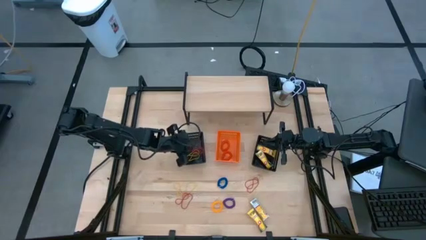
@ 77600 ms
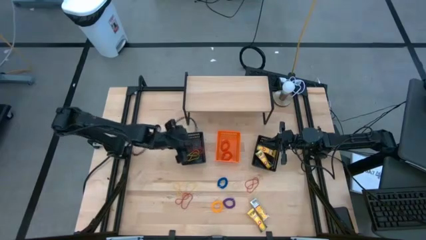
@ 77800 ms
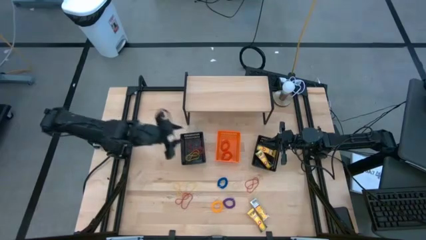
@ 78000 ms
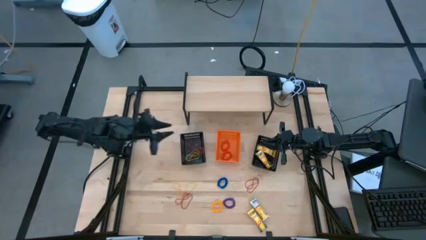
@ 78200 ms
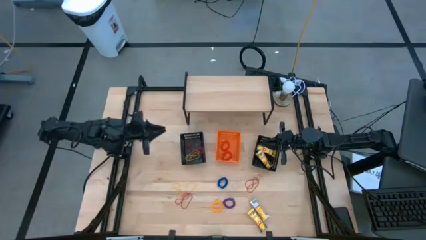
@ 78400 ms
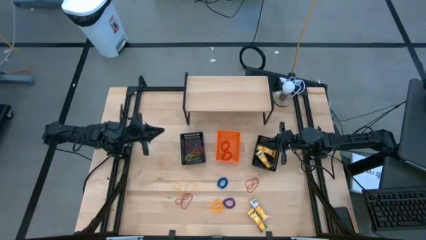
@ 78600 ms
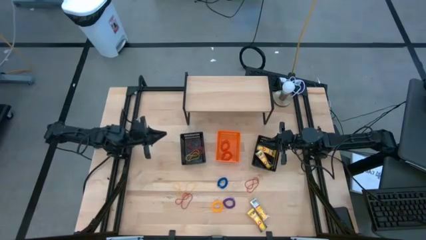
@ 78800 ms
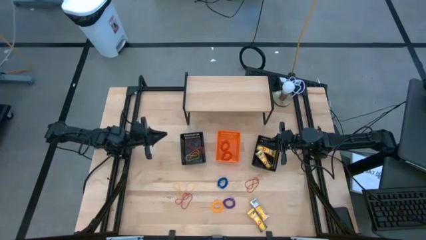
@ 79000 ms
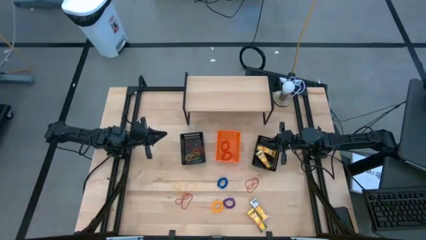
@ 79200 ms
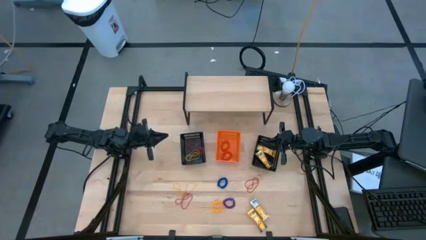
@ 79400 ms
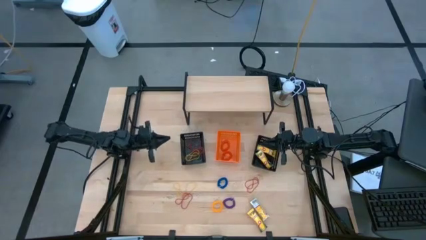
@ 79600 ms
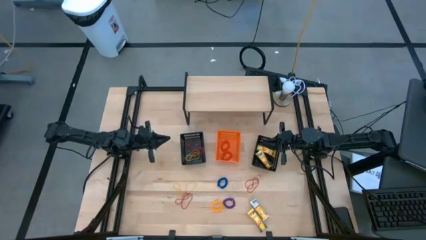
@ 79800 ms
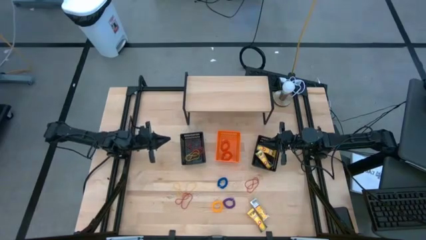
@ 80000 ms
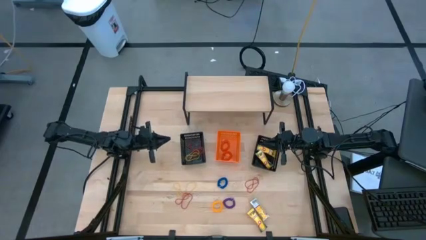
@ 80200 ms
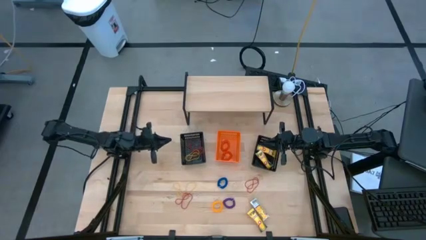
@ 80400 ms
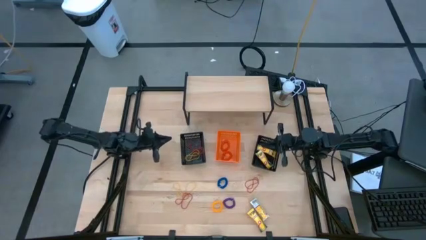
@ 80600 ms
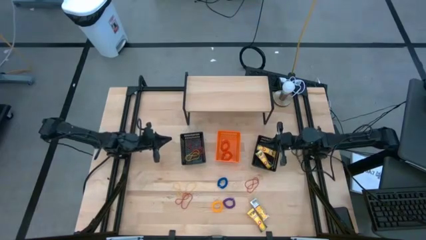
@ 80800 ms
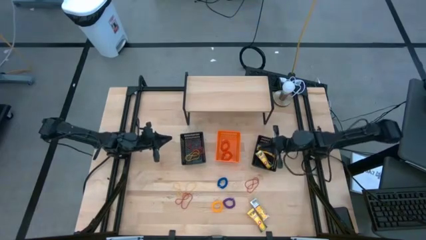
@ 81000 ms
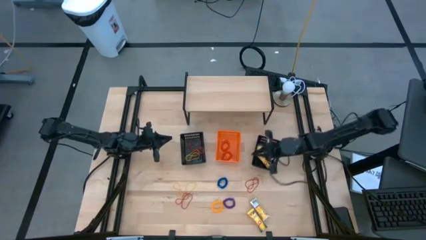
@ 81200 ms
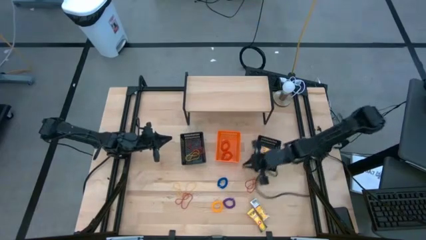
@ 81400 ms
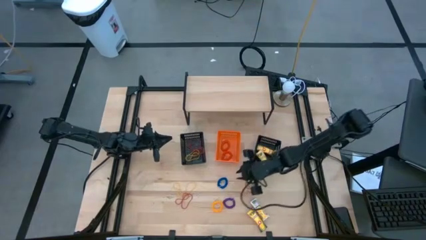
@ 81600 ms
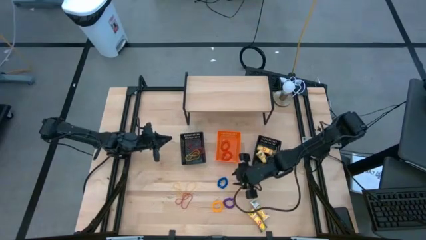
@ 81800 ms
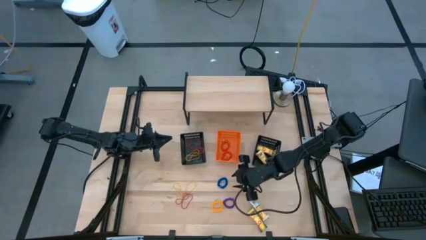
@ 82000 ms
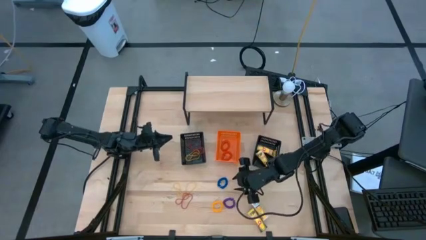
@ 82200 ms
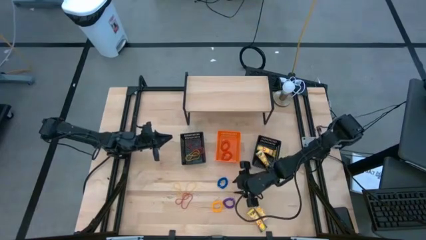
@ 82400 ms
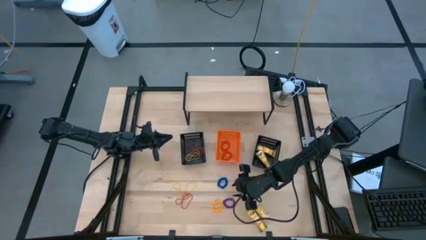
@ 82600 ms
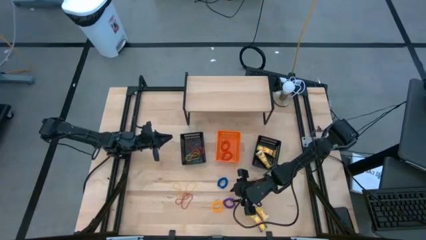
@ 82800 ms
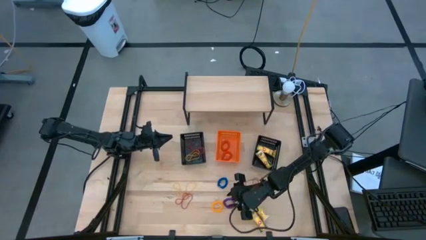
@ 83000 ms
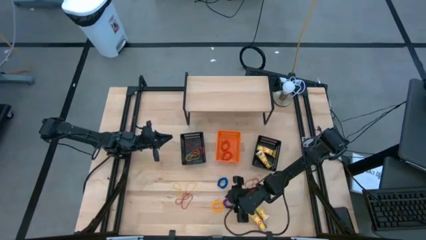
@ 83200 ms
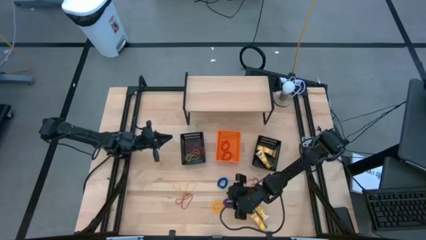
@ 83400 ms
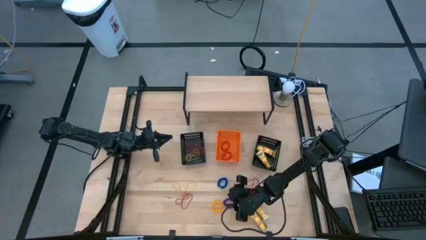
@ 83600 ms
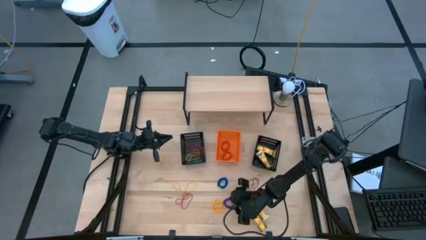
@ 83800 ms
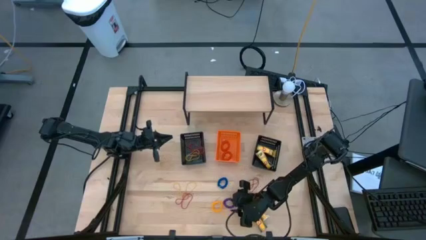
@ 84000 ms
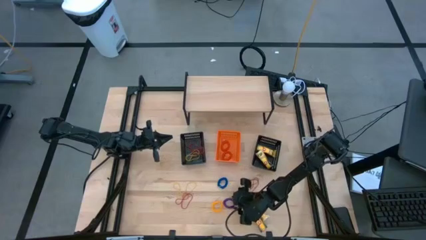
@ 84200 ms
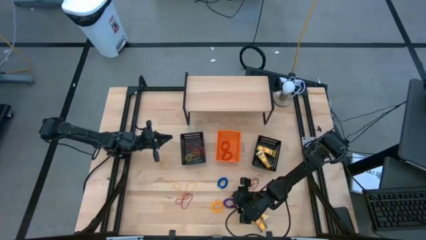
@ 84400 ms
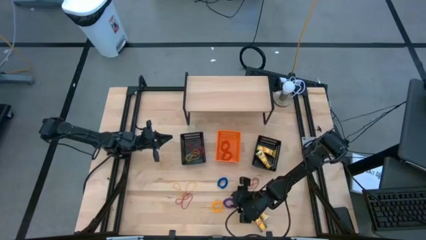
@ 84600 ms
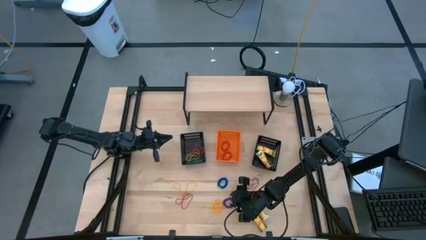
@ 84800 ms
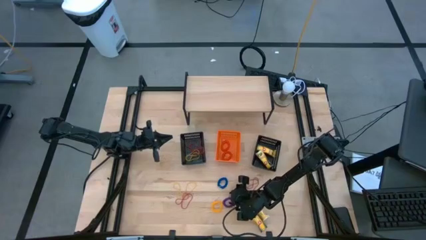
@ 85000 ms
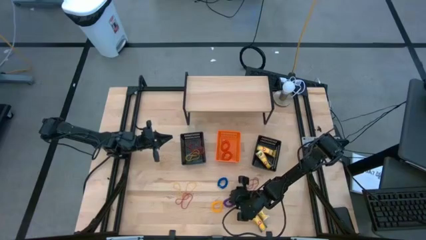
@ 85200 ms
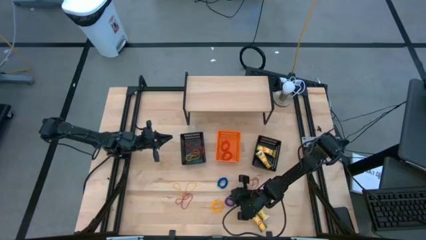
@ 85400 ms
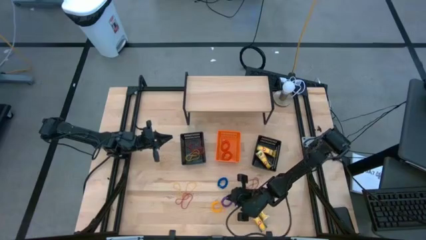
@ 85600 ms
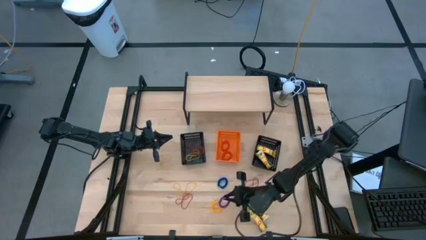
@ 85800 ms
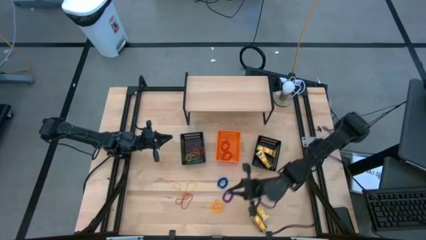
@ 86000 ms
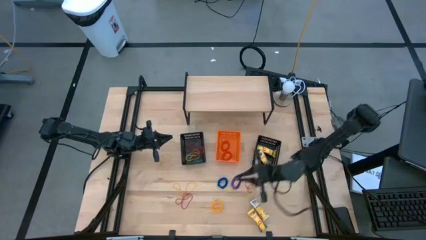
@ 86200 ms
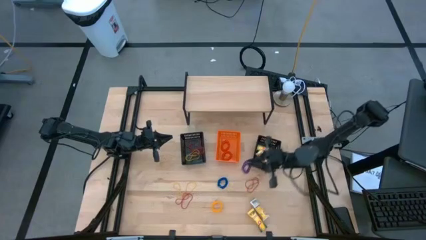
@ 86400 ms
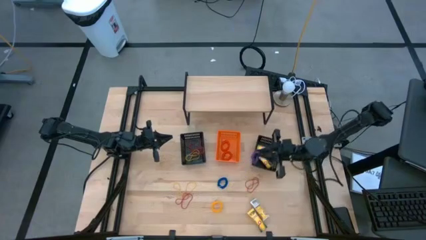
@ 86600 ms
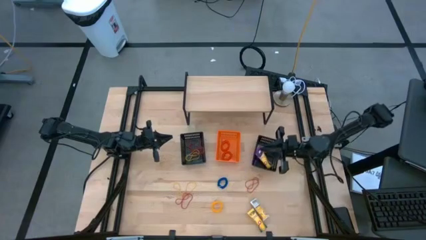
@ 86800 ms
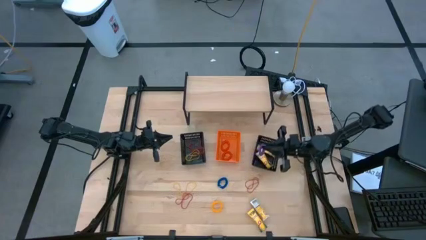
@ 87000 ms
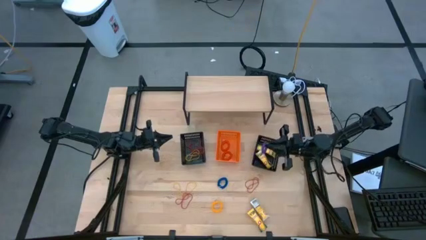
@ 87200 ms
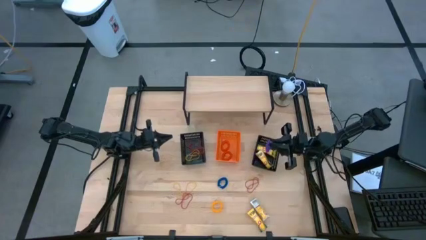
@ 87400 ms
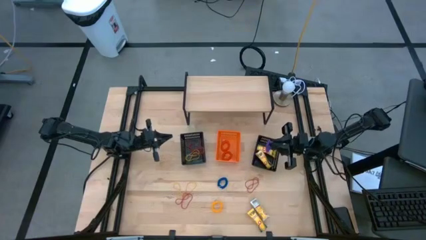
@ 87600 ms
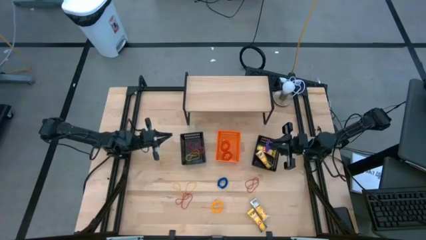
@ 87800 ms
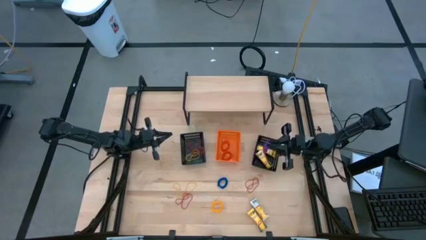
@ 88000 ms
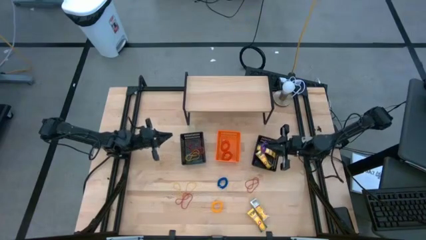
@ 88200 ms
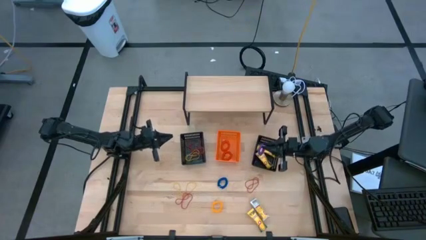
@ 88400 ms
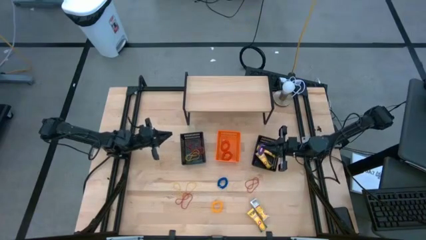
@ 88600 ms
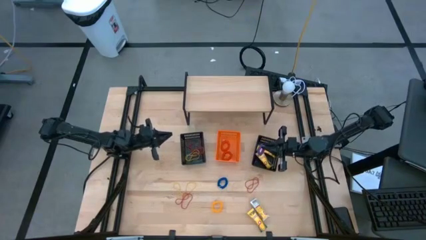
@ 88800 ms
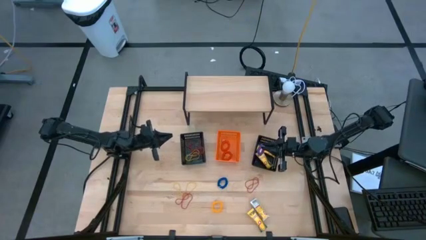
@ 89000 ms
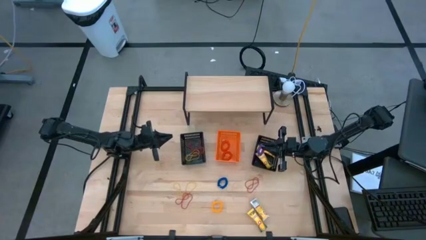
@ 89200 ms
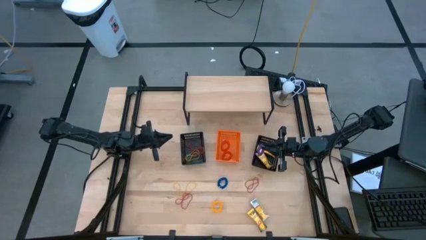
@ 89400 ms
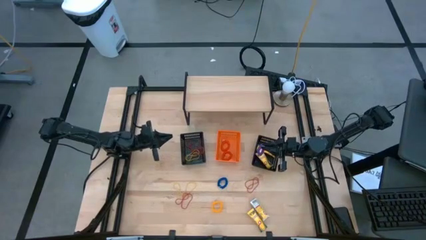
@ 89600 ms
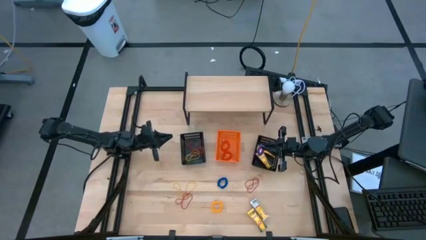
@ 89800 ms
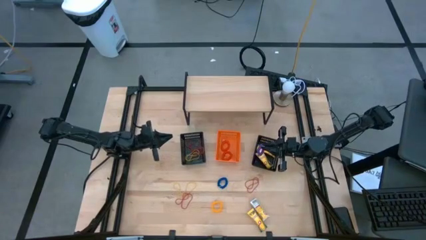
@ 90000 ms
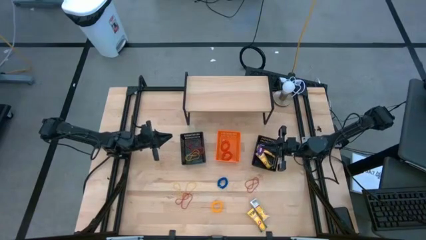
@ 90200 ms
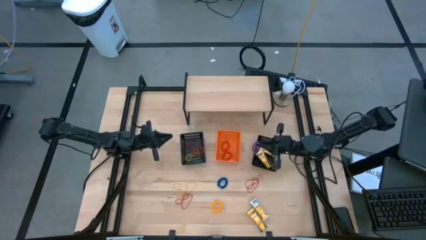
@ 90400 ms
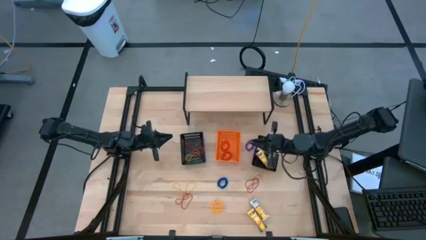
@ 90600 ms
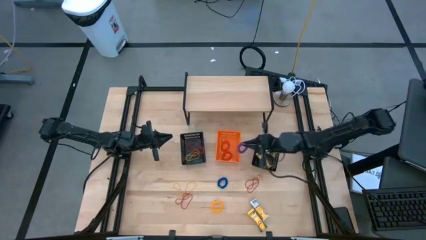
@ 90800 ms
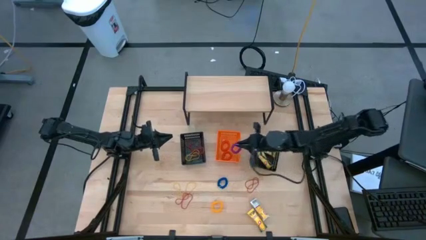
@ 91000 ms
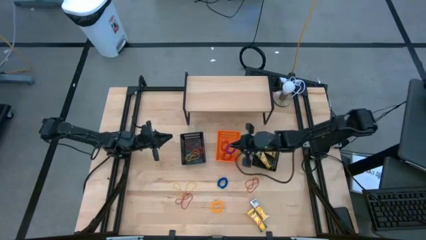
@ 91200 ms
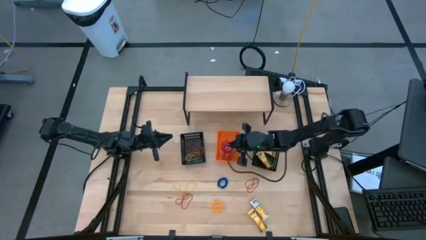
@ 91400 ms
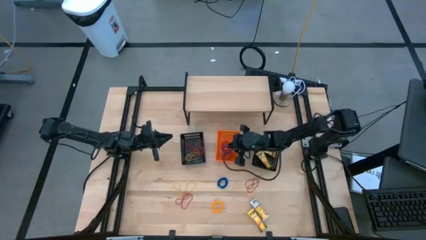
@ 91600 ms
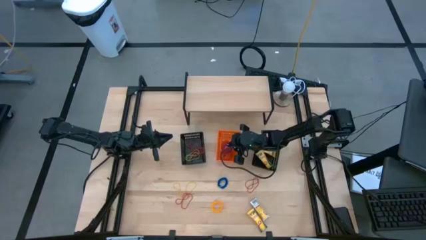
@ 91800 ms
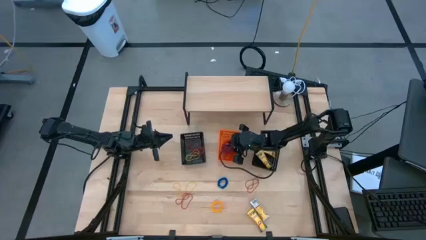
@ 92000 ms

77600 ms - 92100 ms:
Task: Pick & Place Office Desk Supplies
Put the purple spring rubber band into the orange bin
